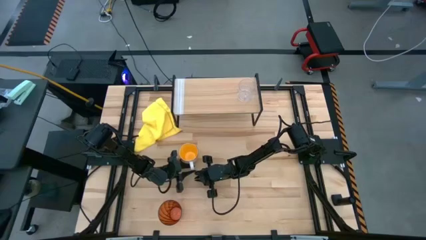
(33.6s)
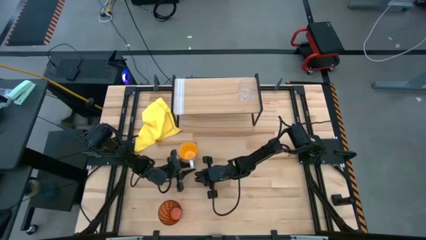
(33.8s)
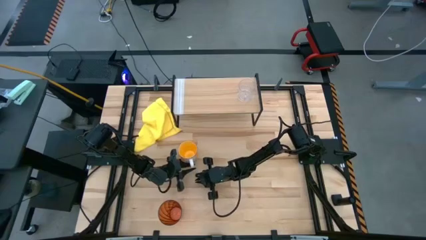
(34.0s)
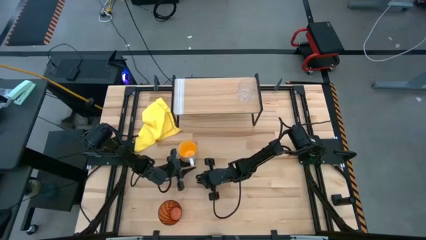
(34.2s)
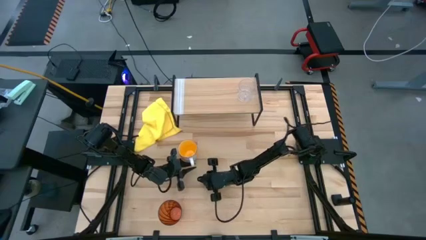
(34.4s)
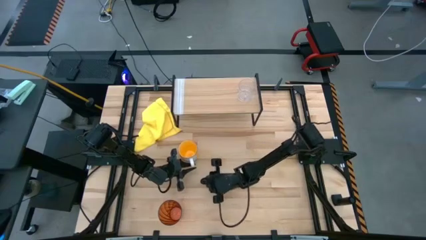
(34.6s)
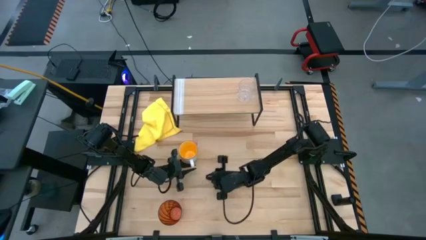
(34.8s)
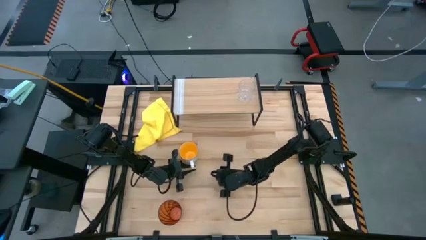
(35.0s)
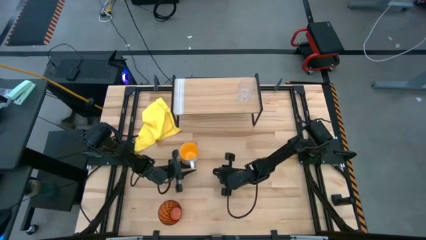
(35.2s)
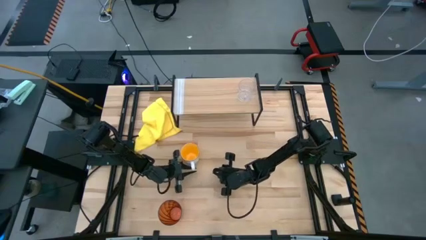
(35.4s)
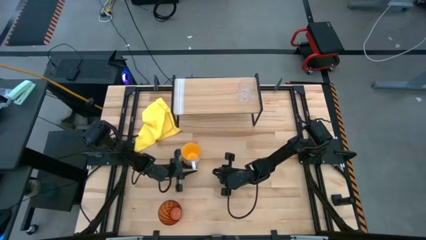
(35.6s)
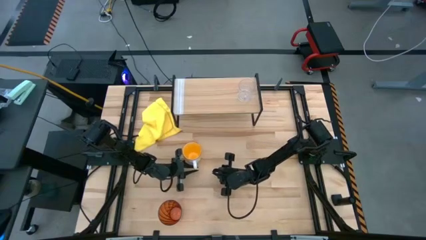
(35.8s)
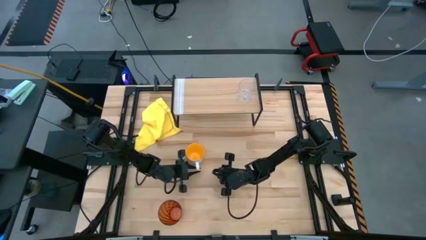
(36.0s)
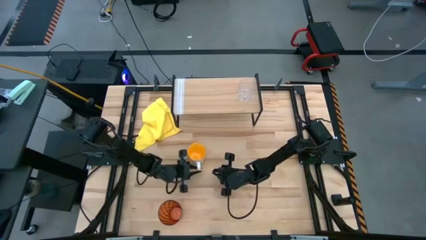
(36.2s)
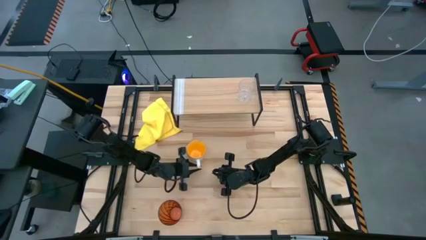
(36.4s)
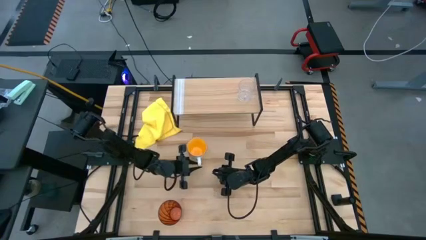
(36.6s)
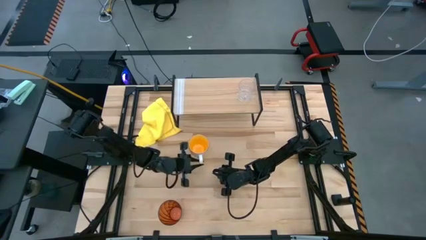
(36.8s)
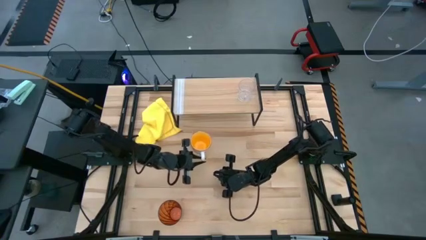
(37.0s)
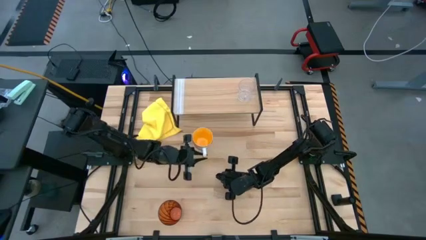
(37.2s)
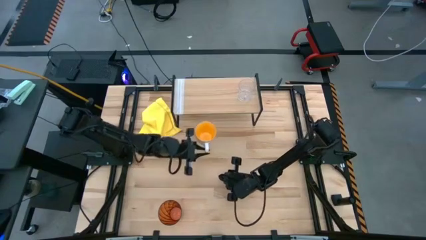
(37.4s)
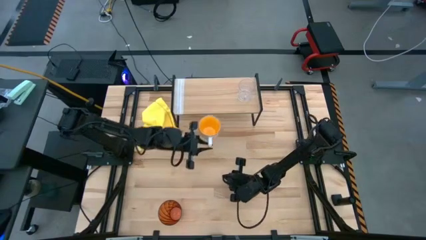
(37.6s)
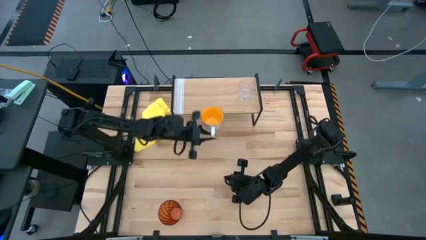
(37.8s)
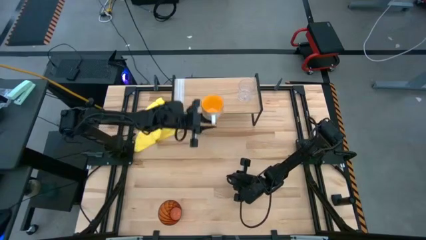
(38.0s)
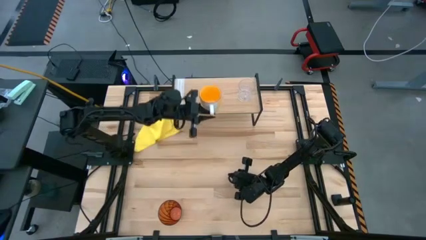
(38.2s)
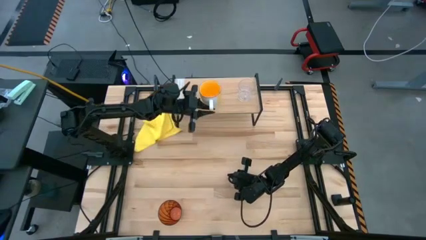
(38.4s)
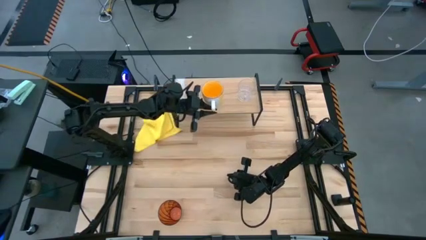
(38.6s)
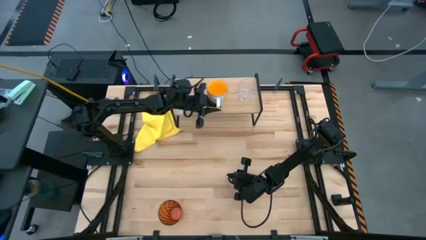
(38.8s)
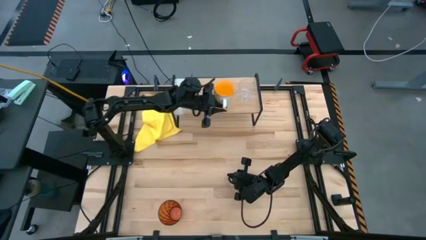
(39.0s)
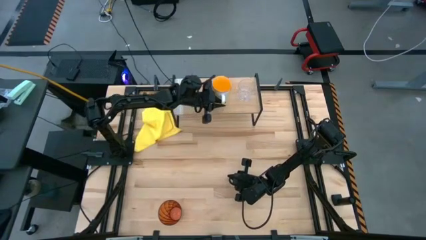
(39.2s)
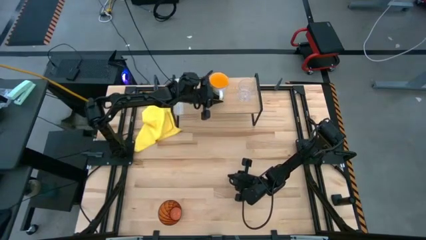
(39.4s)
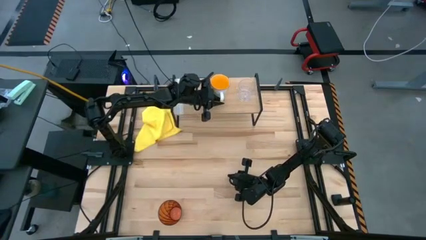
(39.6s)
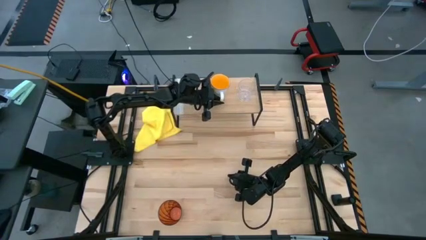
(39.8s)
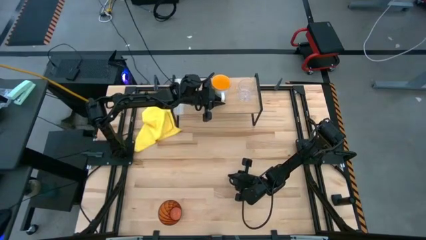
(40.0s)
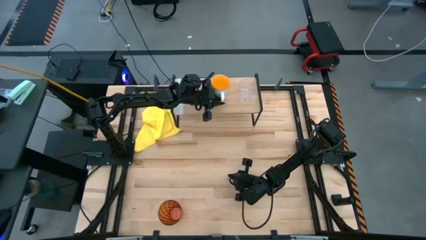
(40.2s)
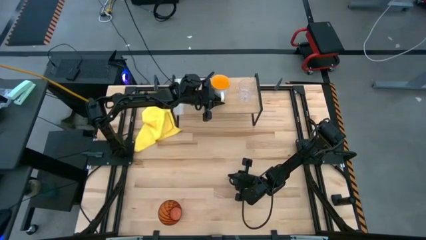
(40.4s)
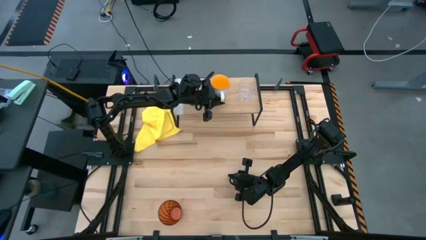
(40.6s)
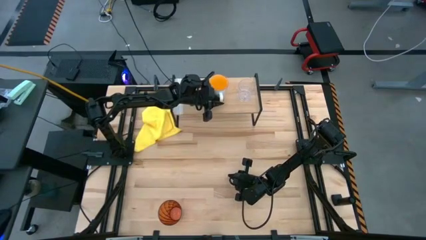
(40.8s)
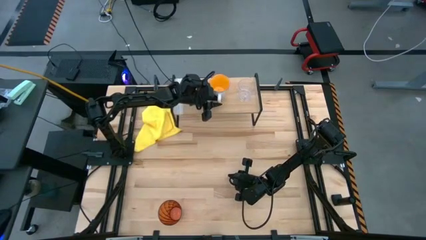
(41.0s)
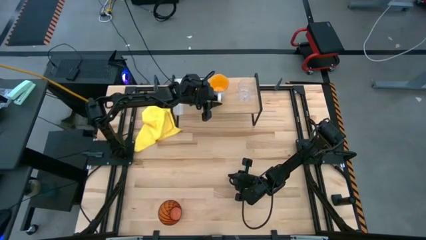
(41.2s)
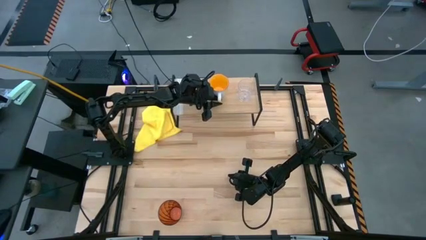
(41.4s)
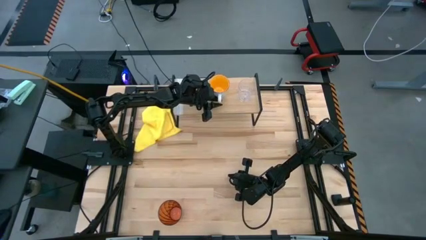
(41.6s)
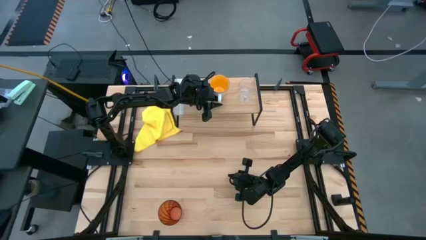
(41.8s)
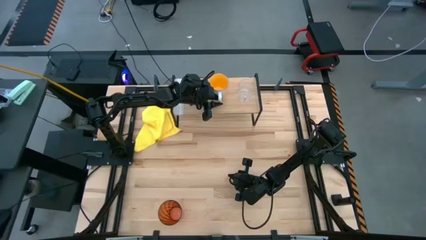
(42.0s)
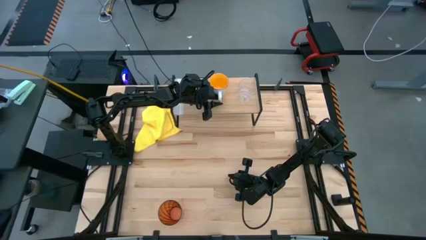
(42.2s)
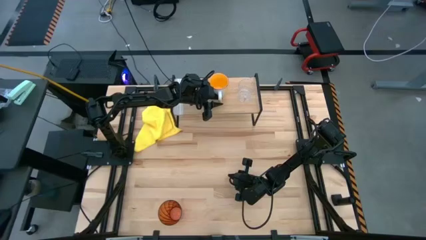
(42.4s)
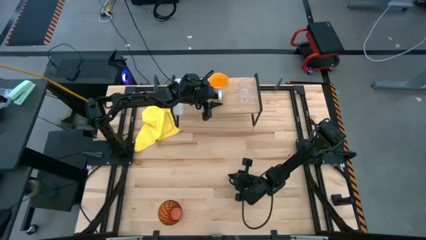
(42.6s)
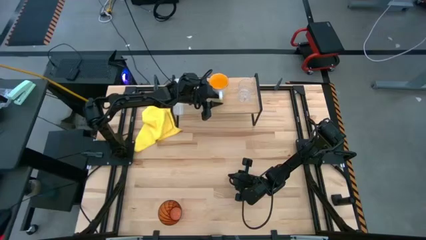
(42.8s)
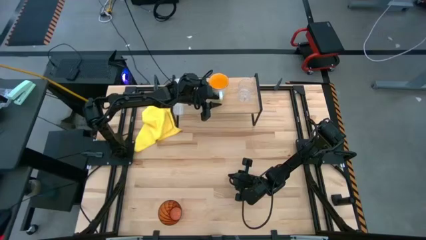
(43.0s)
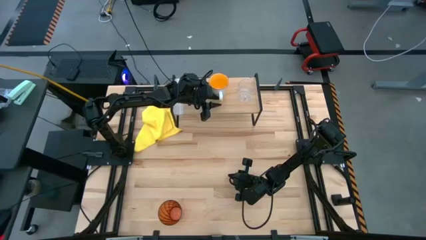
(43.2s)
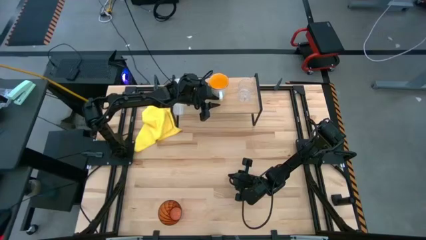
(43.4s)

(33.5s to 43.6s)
Task: Stack small to large cups/mugs on shelf
Put the yellow mug on the shelf
